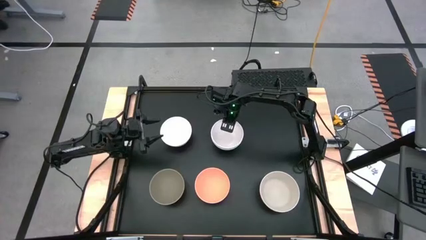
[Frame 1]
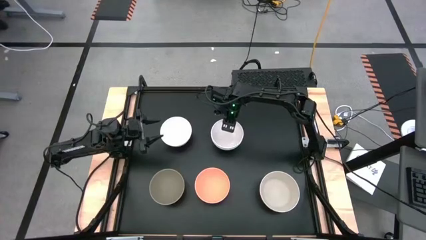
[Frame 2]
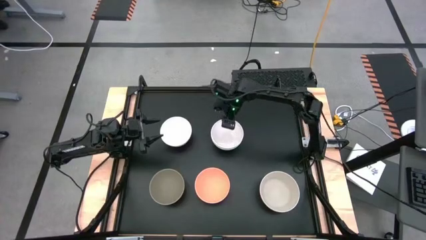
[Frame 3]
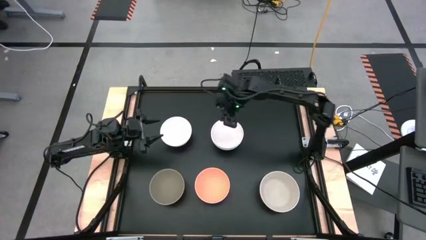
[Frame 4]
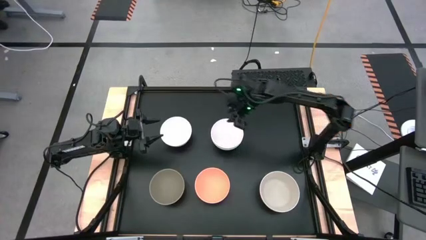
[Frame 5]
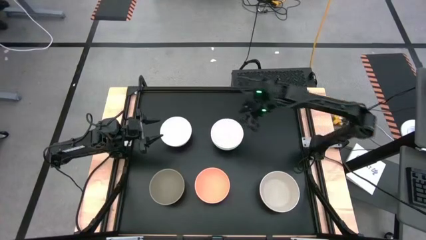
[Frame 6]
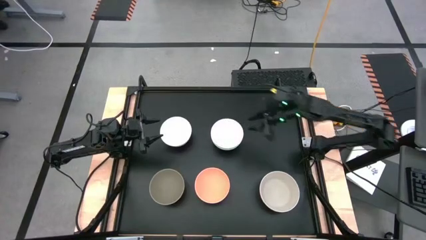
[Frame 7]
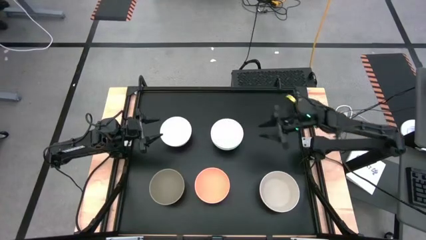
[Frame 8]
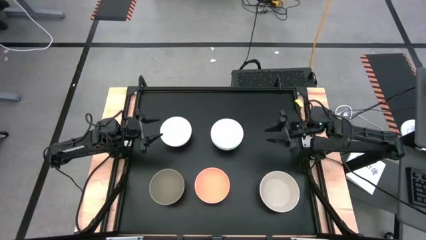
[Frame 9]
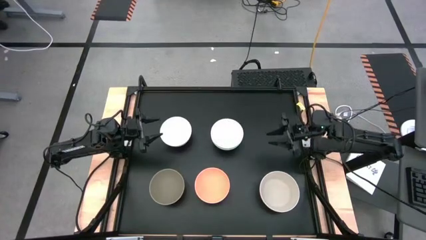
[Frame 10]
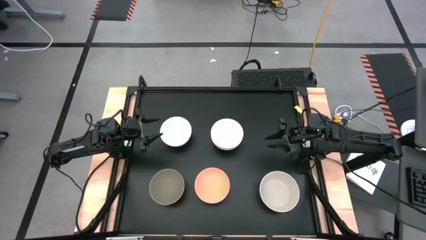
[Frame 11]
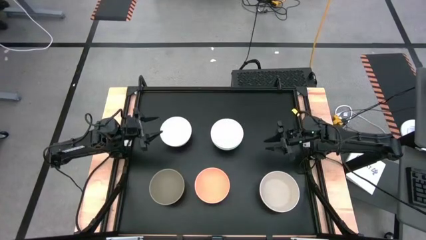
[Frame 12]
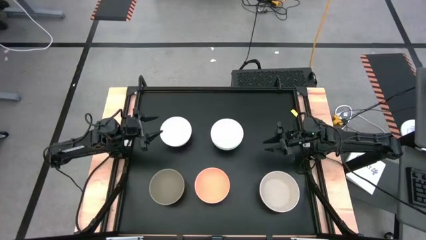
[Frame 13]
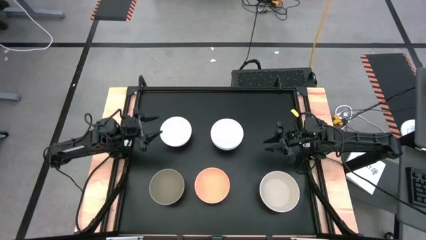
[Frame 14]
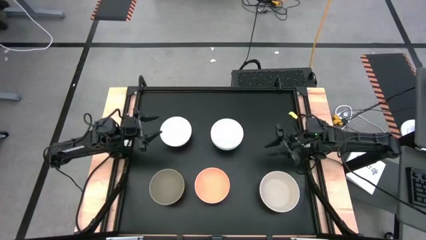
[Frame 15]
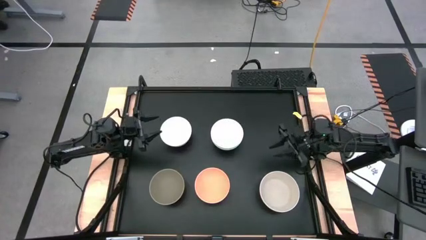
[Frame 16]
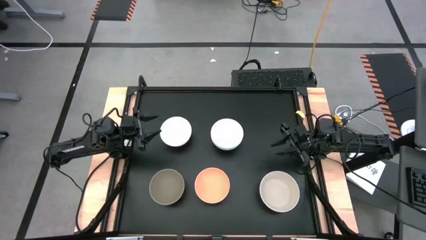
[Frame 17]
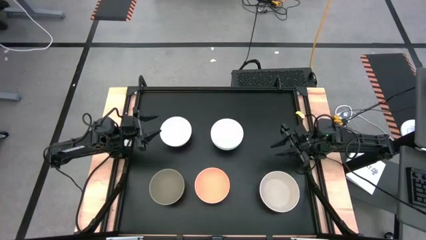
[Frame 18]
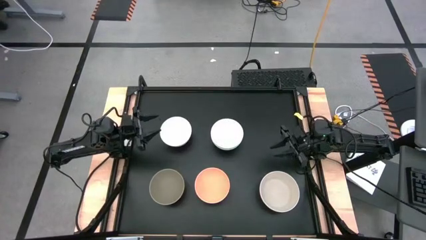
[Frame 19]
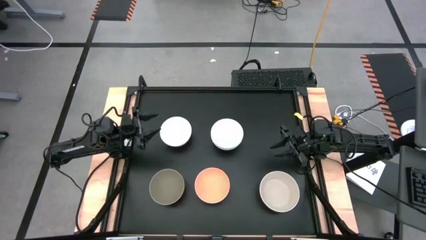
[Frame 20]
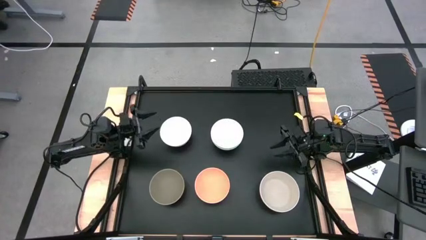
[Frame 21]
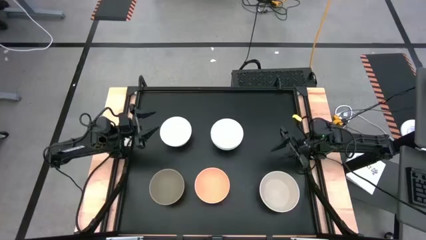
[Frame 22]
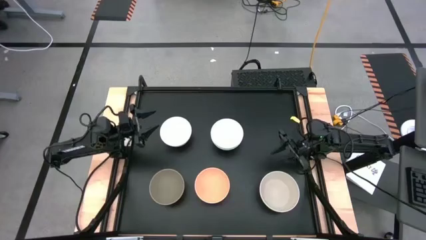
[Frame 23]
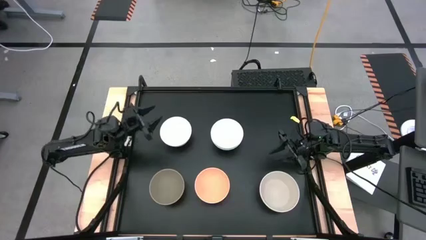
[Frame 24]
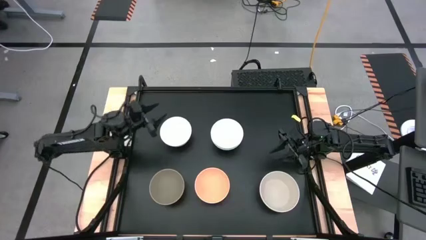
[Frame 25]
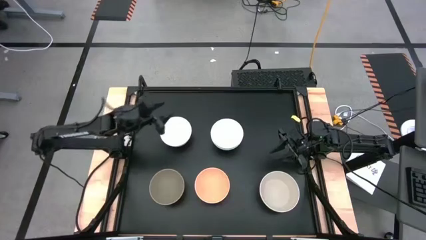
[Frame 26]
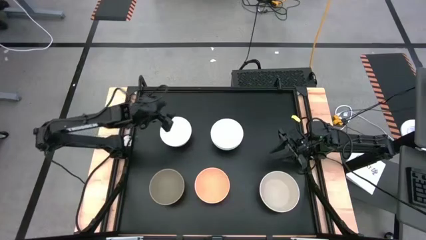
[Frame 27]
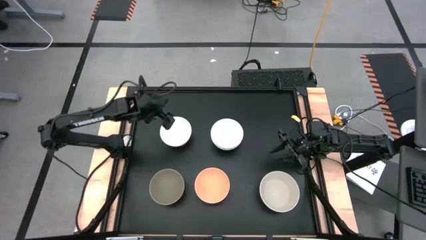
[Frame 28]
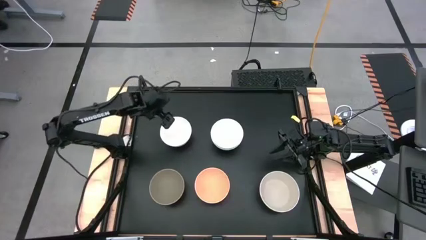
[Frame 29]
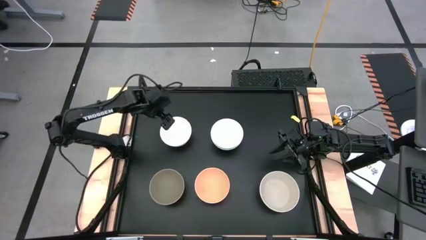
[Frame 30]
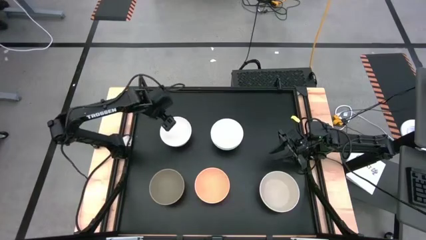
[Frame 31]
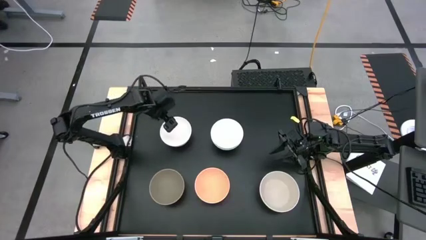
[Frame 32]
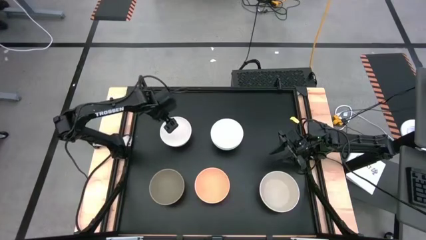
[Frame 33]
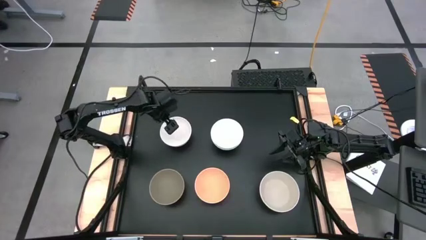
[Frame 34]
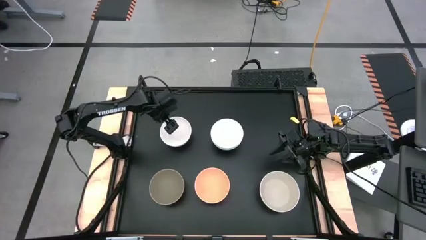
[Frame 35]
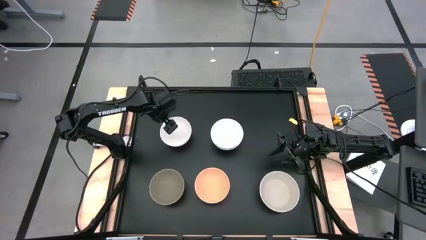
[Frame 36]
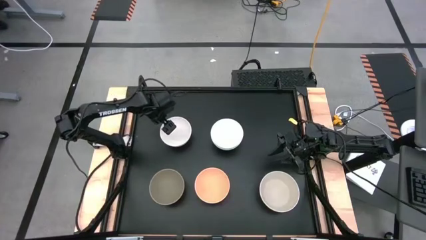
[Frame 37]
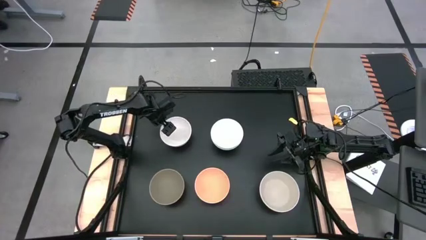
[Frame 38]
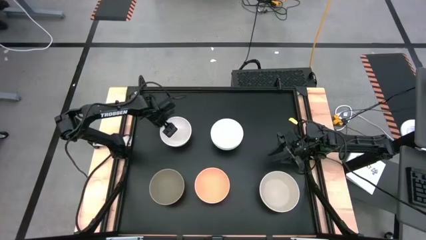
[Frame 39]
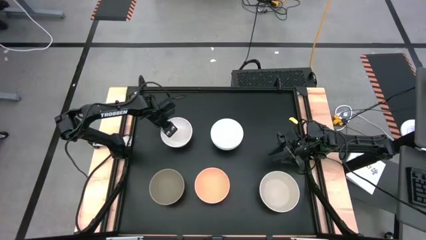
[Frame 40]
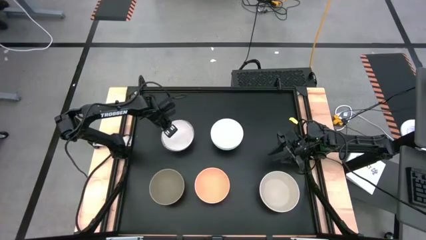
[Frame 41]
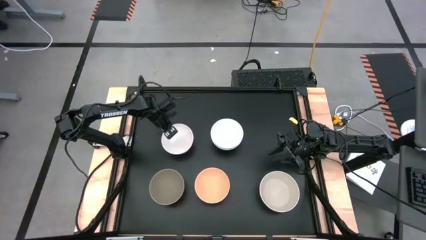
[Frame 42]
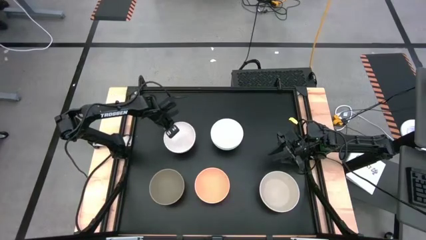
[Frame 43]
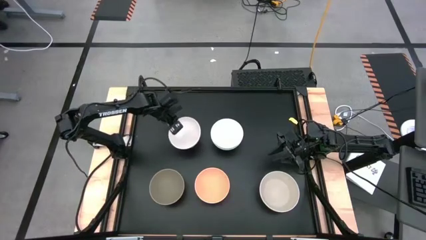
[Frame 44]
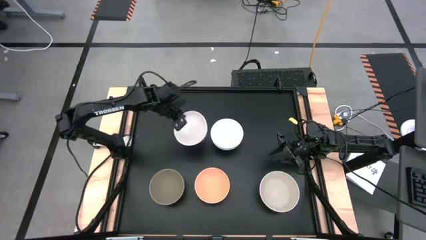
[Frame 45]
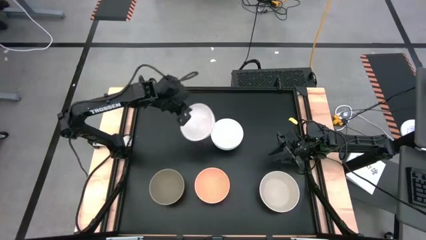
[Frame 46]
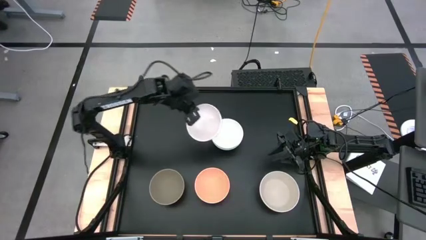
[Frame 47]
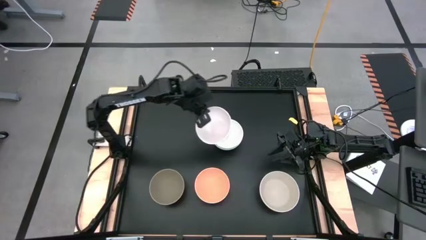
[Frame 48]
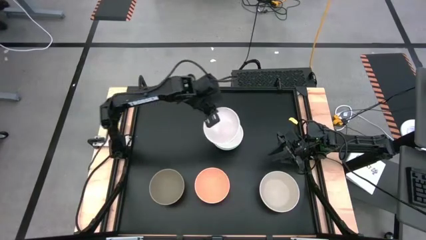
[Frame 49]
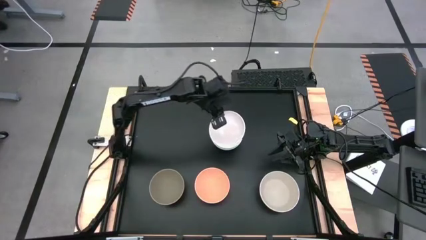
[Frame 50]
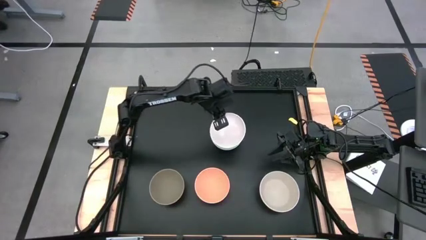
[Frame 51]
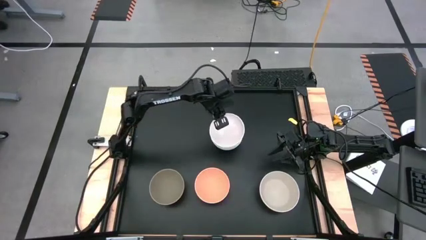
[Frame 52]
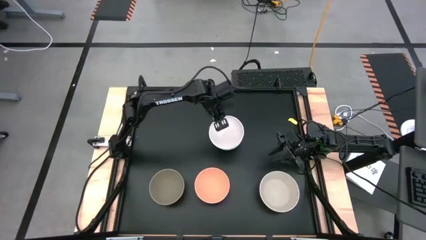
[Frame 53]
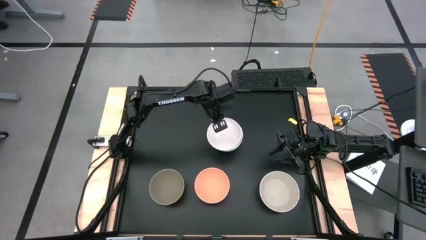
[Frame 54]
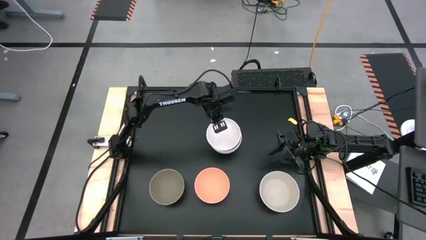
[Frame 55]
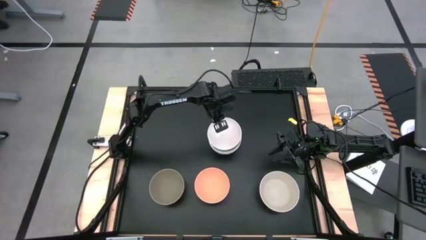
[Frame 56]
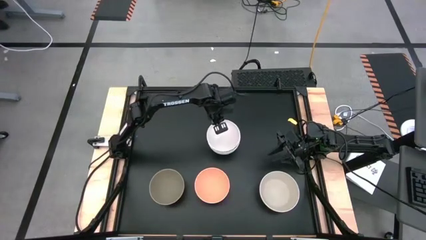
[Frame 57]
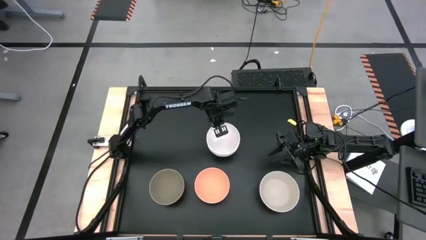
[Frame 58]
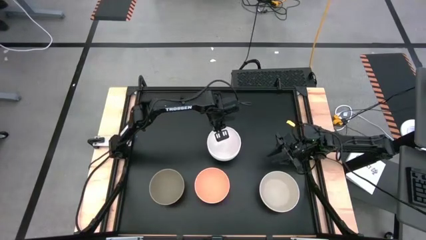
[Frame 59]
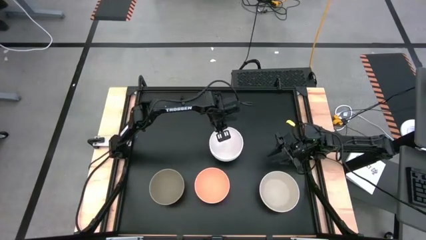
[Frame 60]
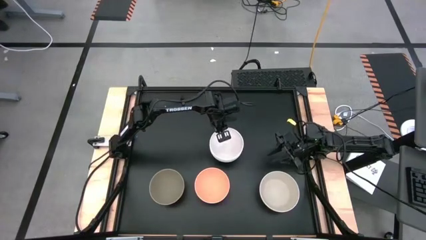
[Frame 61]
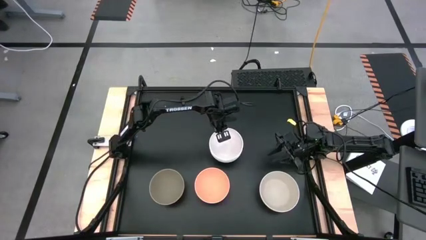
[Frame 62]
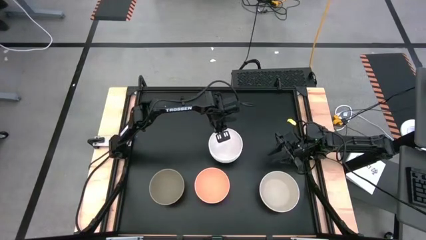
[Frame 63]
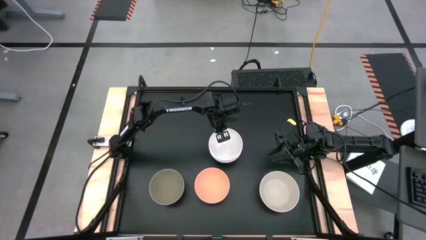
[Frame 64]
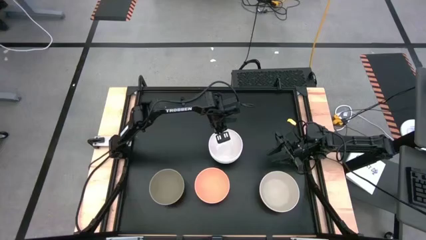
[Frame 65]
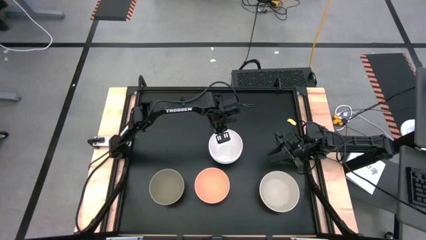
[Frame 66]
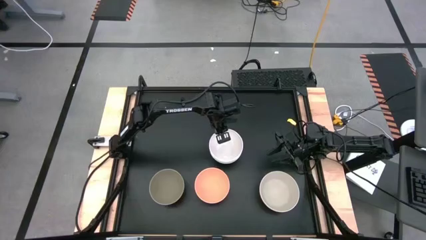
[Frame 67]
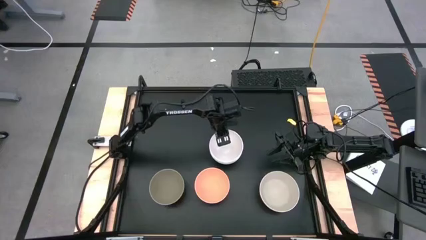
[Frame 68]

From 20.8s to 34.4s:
Task: Nest bowls inside each other
Stack the white bowl on the white bowl

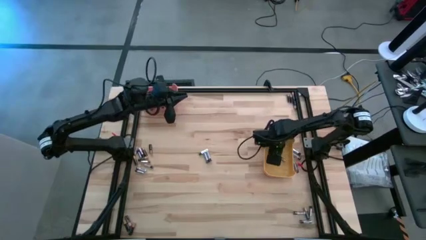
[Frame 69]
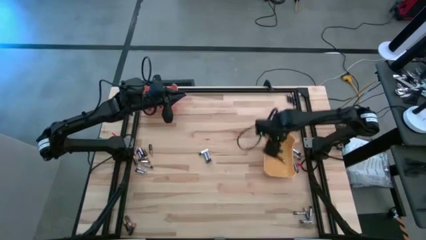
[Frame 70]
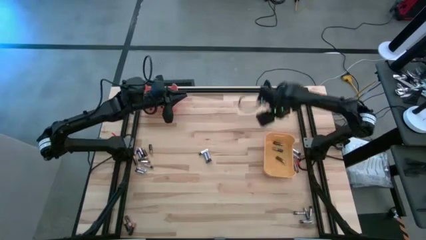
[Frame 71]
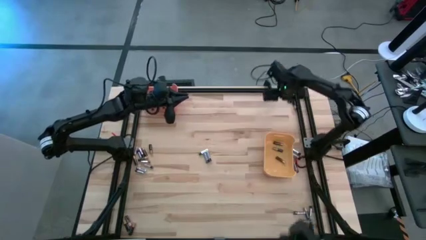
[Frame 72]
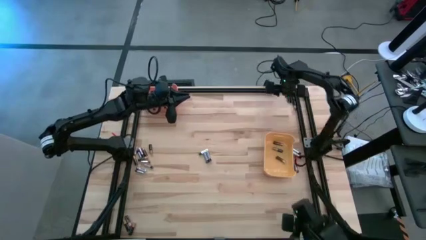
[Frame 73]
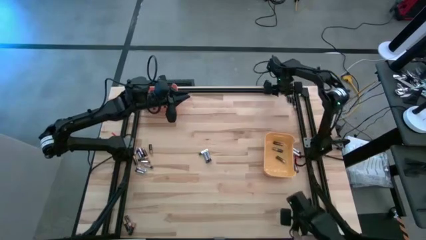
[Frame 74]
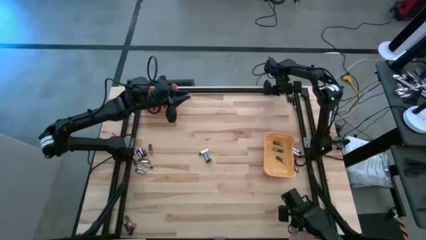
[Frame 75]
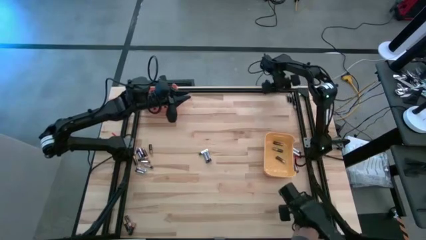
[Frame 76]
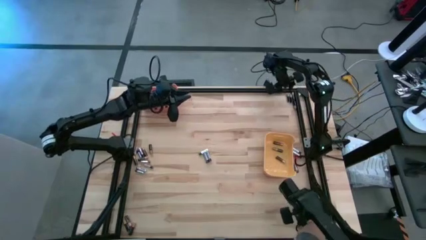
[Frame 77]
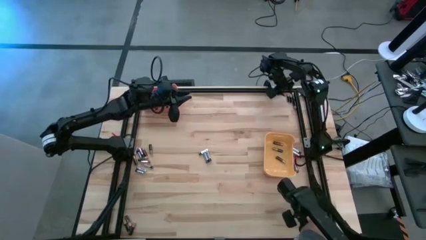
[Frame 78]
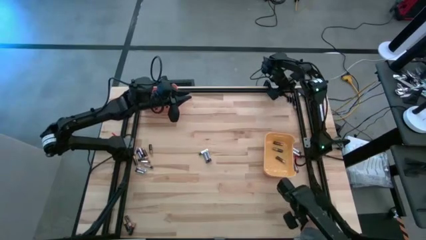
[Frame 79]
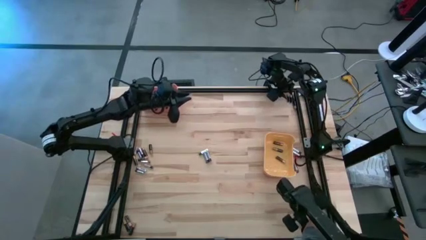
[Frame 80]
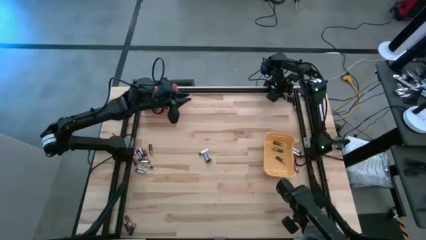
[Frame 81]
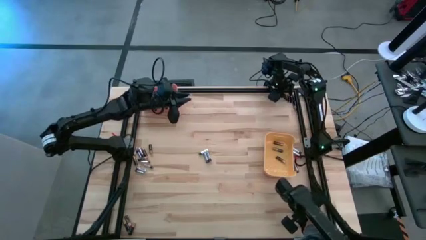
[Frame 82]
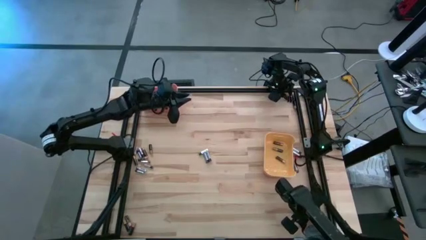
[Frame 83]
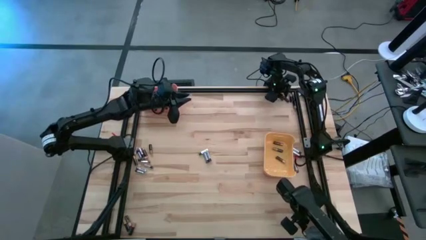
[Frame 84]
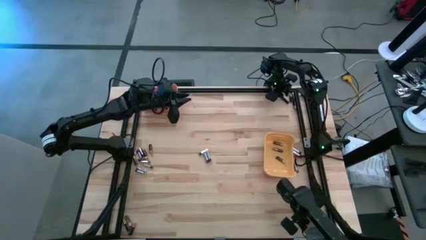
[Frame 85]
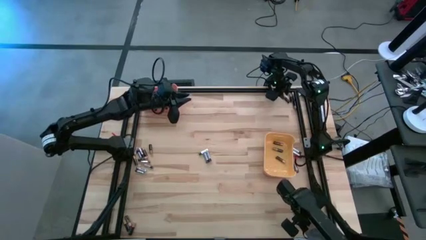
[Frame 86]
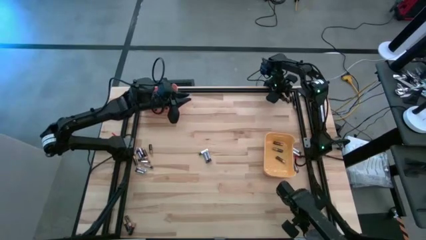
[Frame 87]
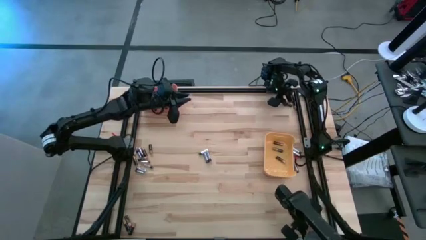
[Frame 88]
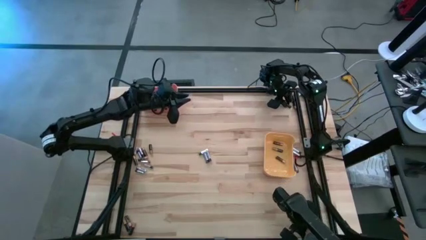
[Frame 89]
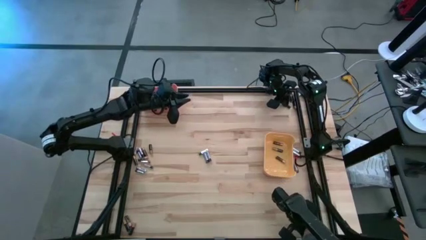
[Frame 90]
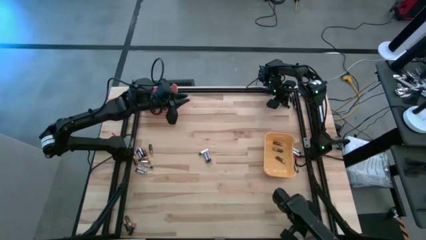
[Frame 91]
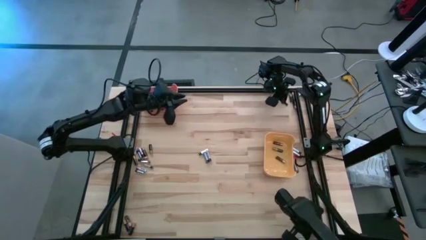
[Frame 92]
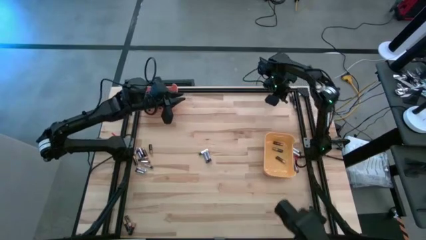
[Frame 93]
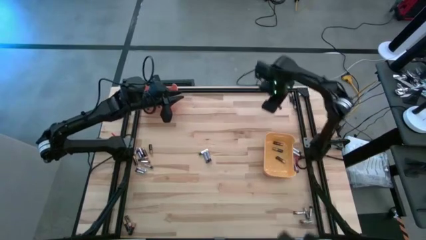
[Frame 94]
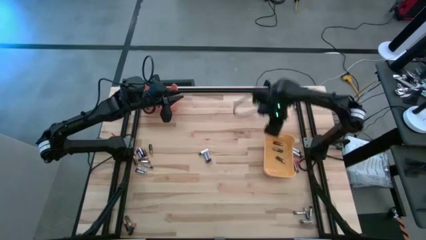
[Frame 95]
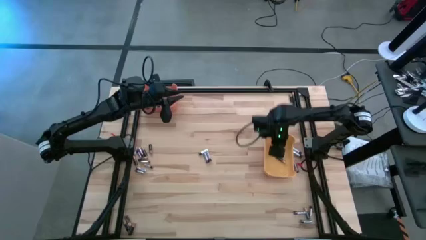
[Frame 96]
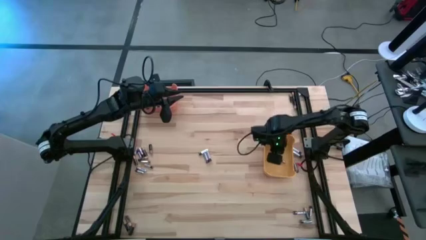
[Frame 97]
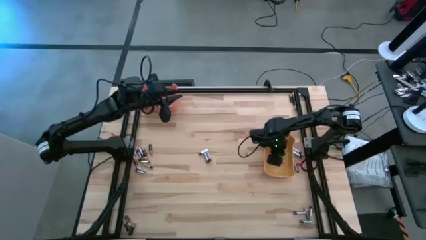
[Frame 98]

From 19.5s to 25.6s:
Task: Sort batteries
Put the black battery into the yellow bin
